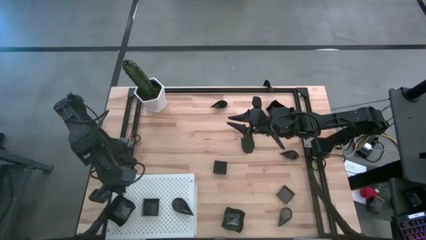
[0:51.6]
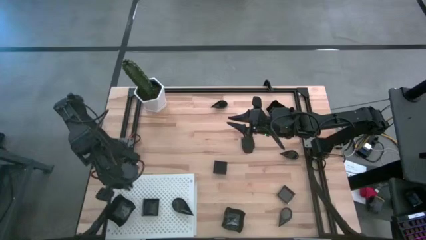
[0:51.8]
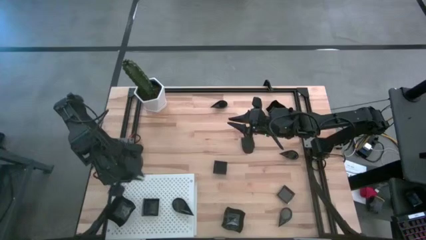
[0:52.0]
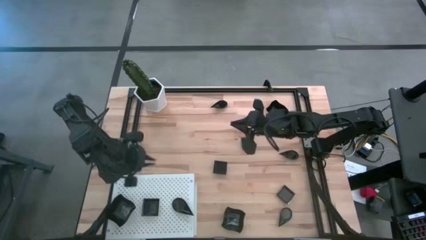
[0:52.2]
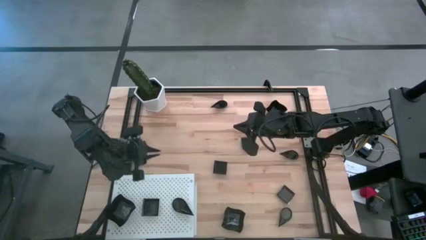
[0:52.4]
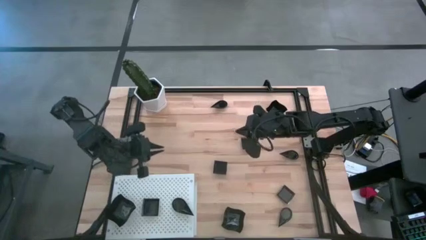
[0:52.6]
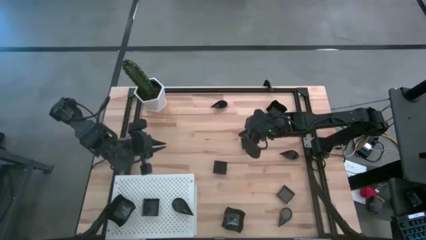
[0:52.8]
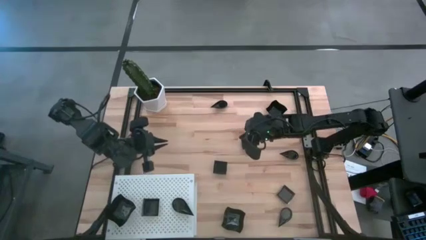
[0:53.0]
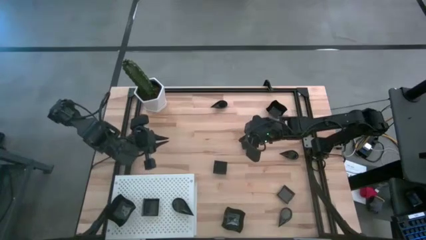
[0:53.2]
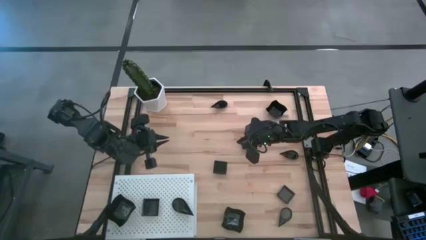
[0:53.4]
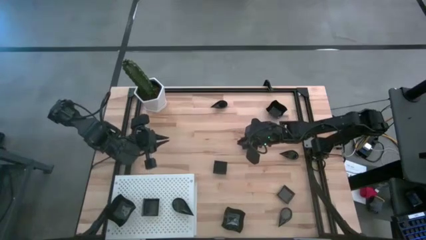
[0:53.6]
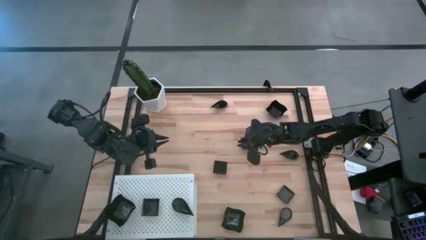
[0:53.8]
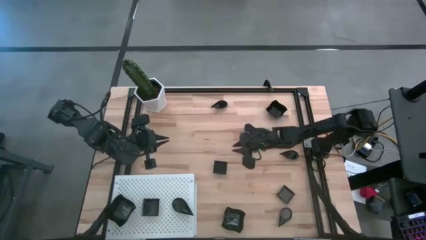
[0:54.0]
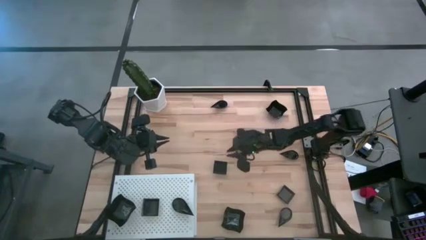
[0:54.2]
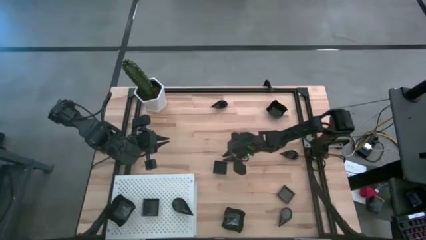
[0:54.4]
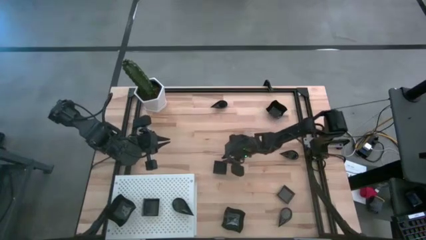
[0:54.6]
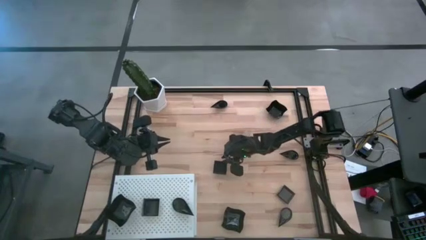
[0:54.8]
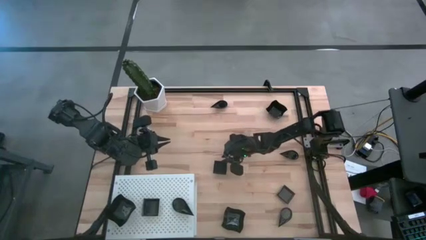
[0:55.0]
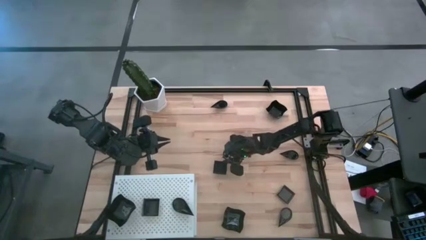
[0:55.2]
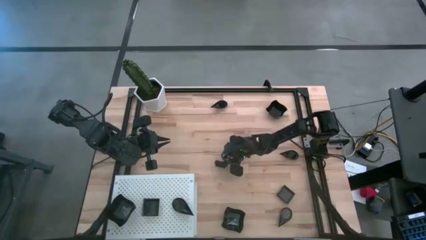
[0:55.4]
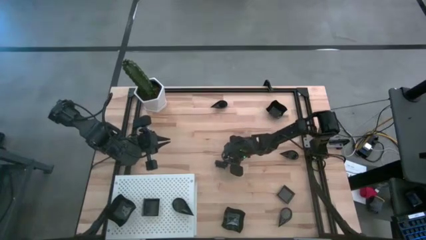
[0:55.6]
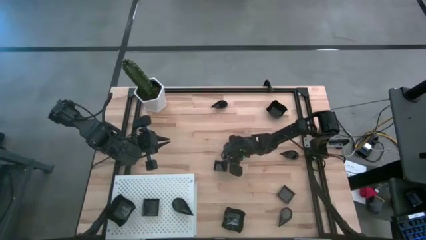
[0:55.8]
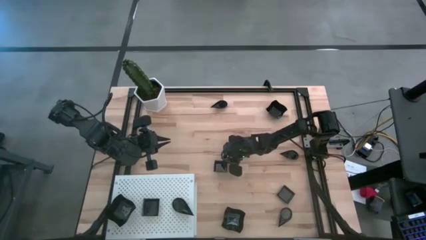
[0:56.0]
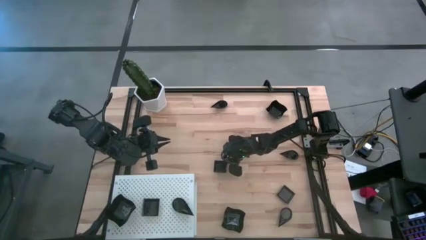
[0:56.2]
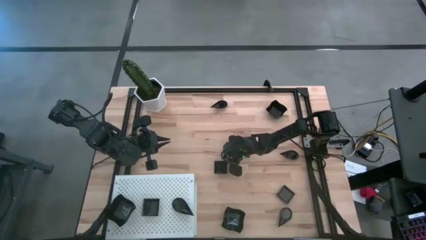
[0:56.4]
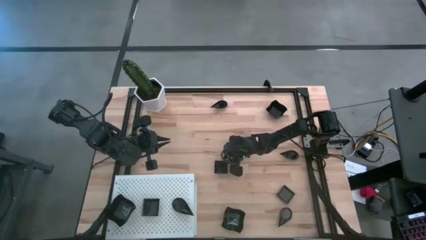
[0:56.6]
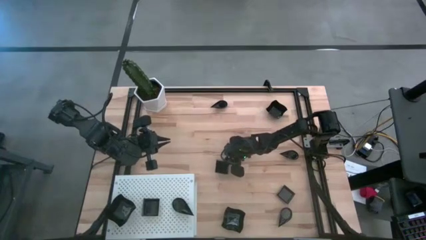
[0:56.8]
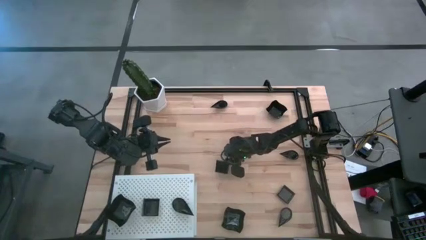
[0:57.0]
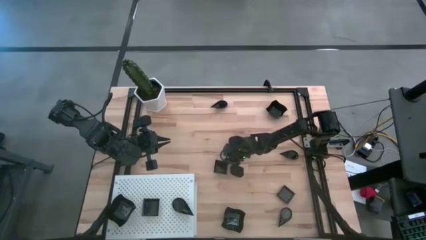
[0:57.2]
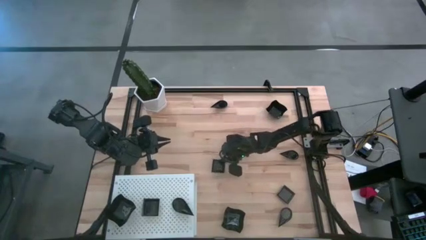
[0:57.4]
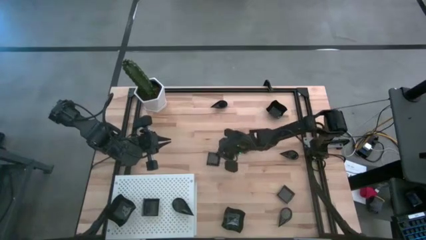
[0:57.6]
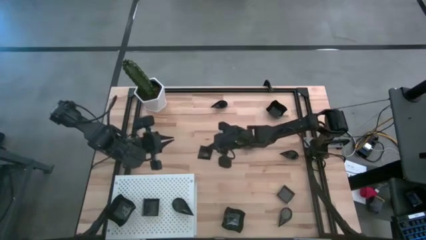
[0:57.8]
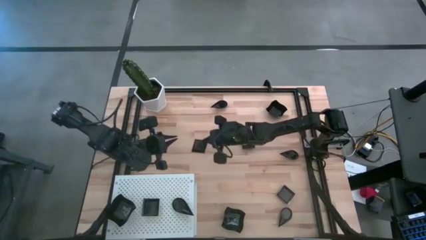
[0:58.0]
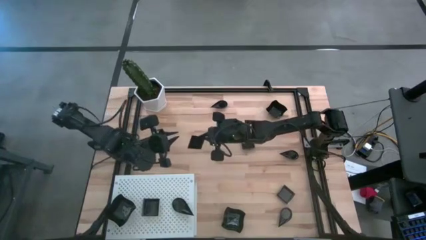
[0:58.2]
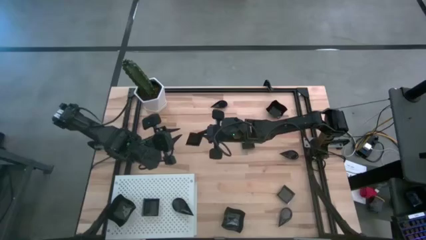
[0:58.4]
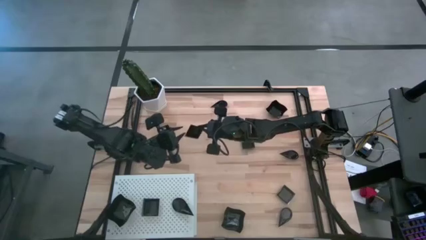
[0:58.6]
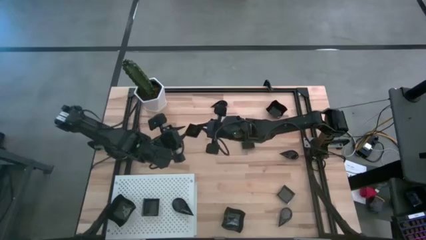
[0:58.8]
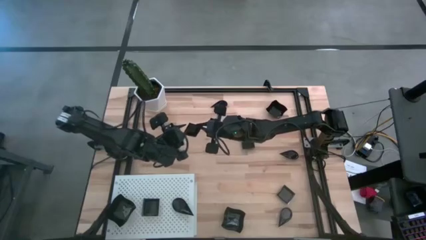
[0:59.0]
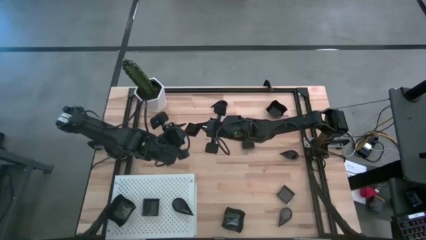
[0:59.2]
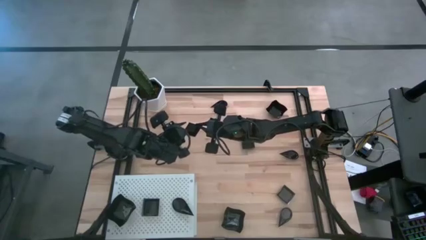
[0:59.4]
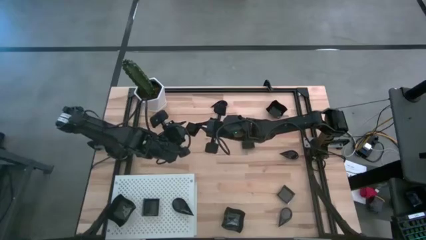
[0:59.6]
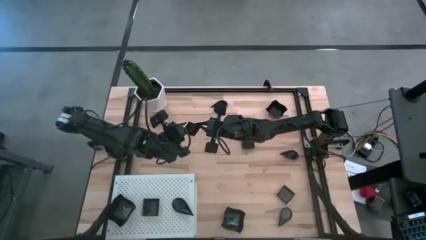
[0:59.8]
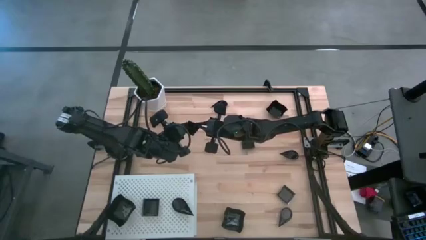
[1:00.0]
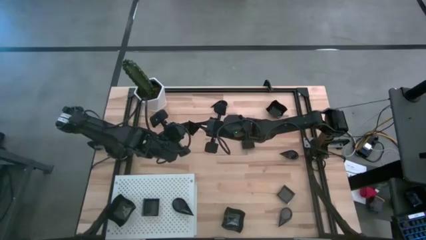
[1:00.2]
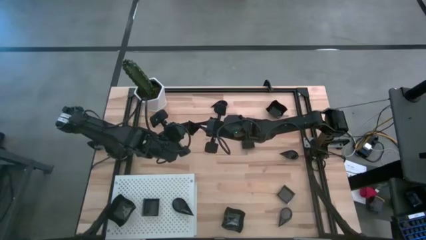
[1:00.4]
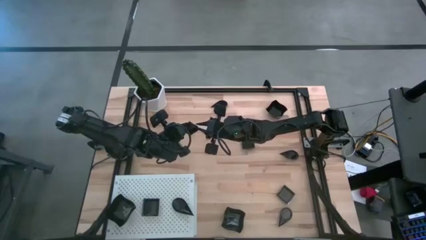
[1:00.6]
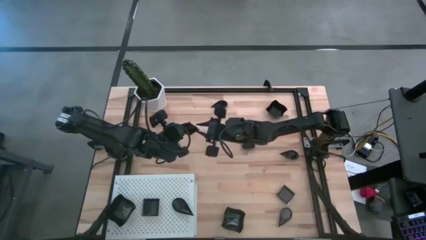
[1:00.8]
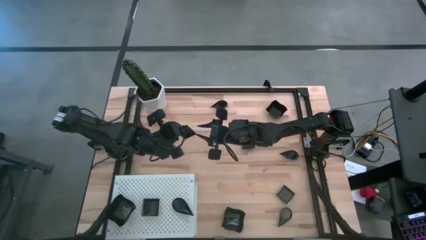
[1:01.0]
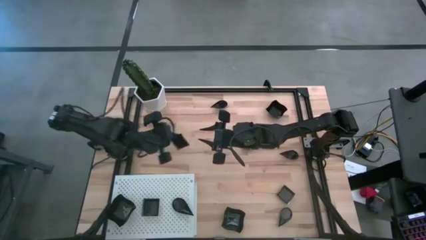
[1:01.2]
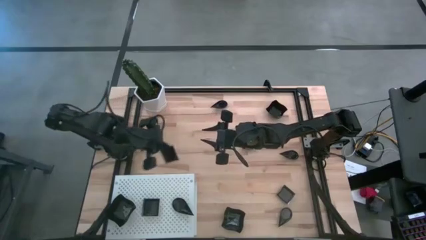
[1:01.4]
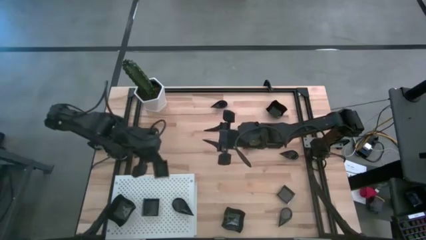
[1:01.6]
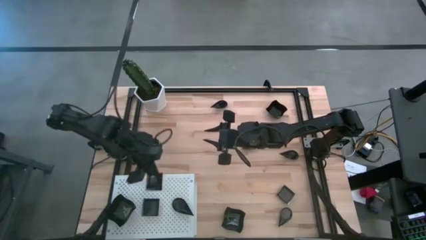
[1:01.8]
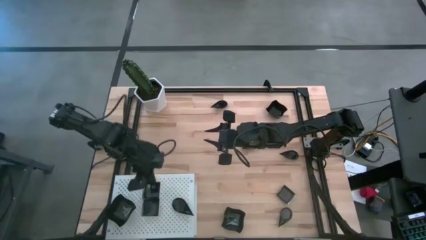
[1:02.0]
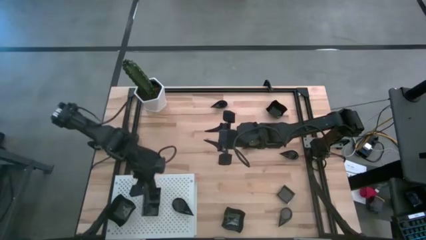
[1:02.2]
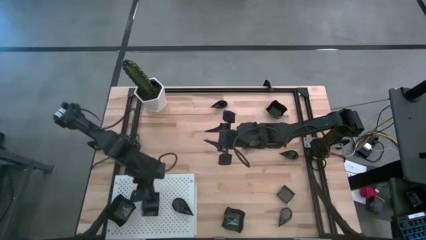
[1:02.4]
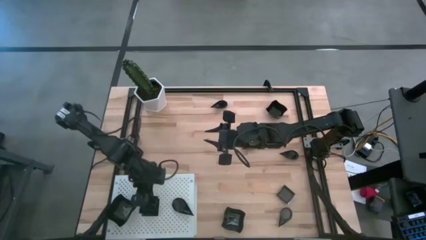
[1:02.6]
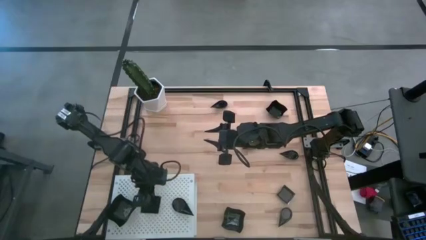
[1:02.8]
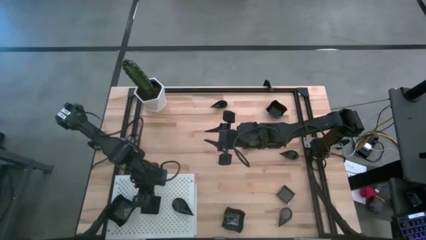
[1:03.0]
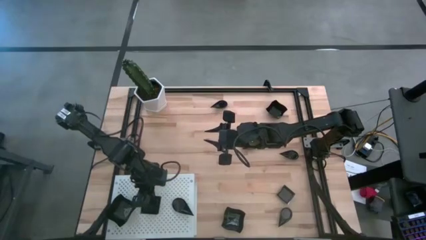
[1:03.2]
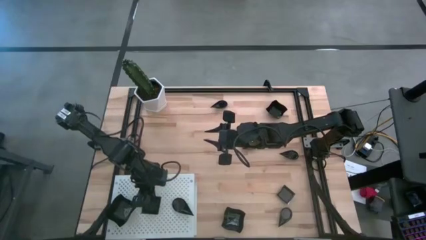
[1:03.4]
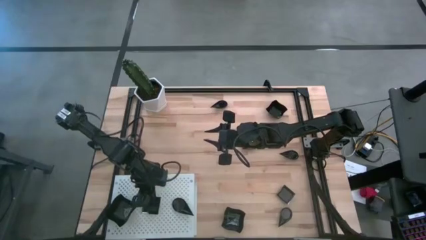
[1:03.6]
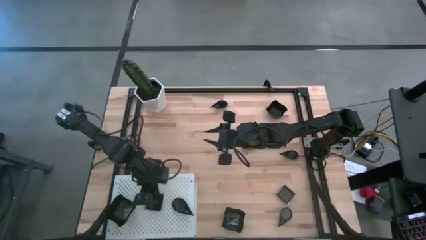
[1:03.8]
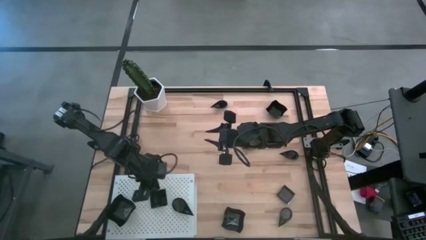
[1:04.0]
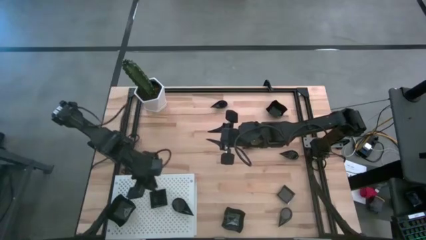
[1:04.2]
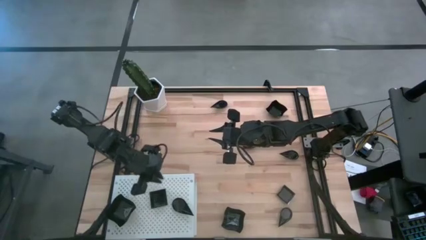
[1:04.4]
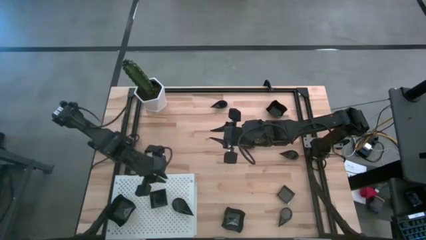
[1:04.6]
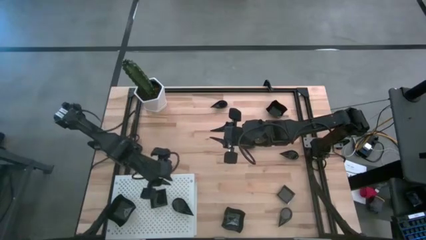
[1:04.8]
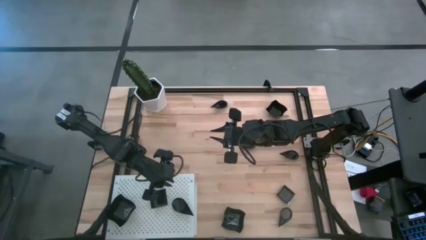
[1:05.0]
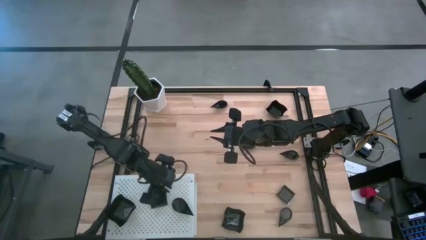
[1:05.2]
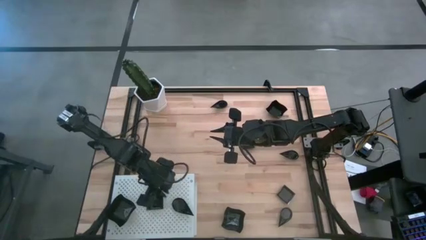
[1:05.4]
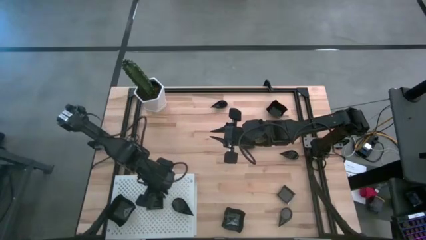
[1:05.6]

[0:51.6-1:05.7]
Task: Pick & Place Mini shaped plates
Stack the square plate on top of the other square plate on the shelf
